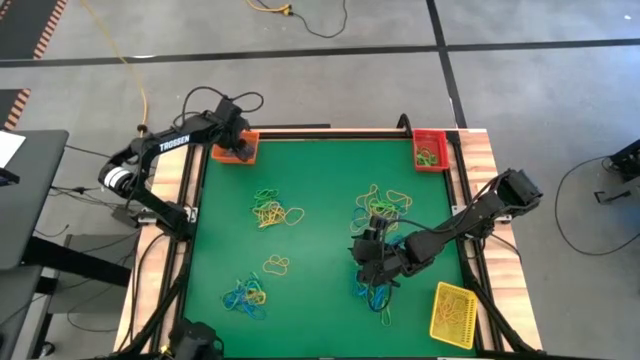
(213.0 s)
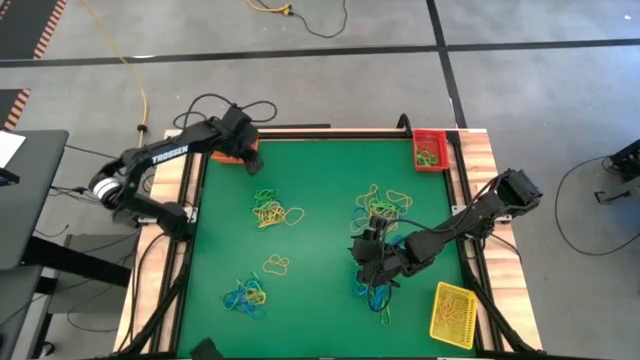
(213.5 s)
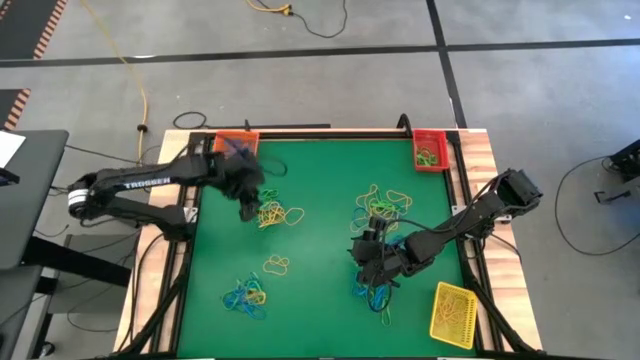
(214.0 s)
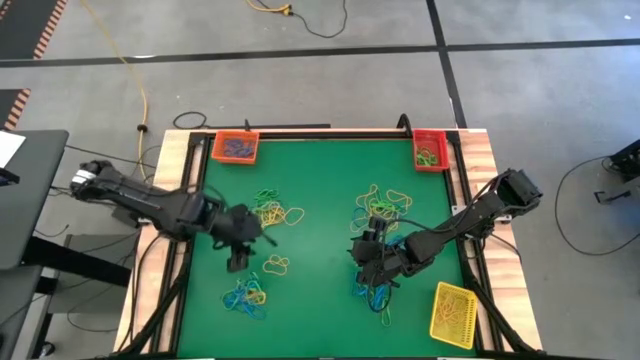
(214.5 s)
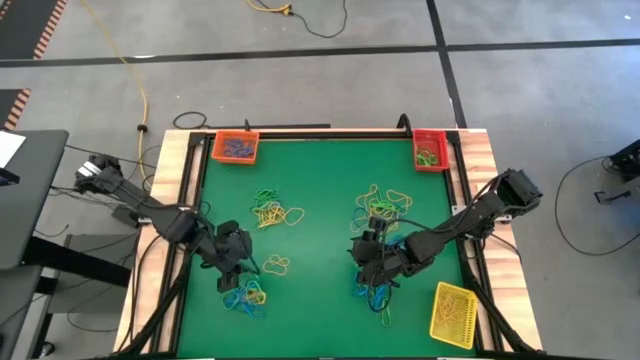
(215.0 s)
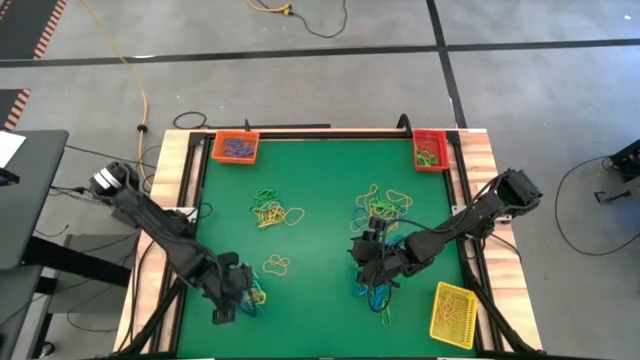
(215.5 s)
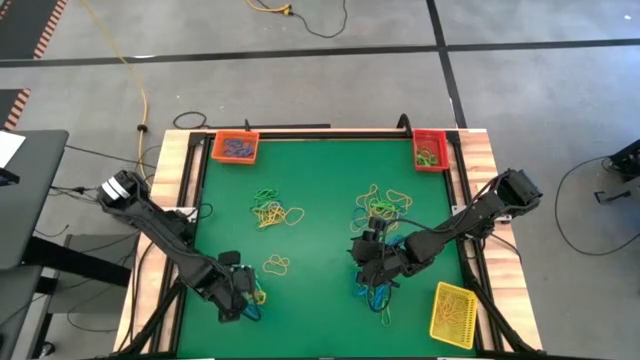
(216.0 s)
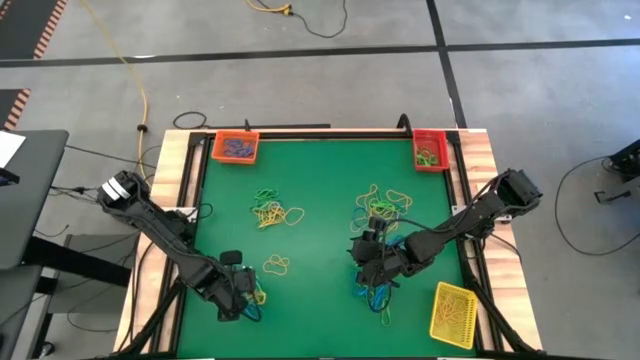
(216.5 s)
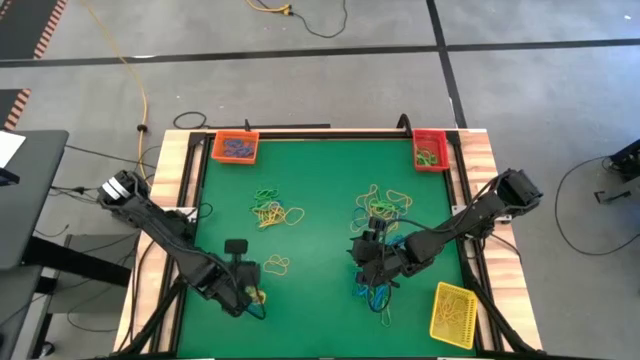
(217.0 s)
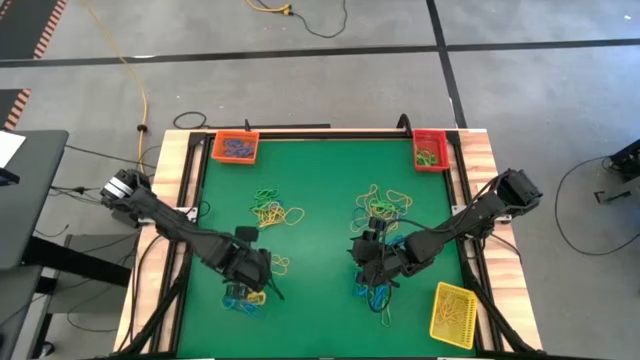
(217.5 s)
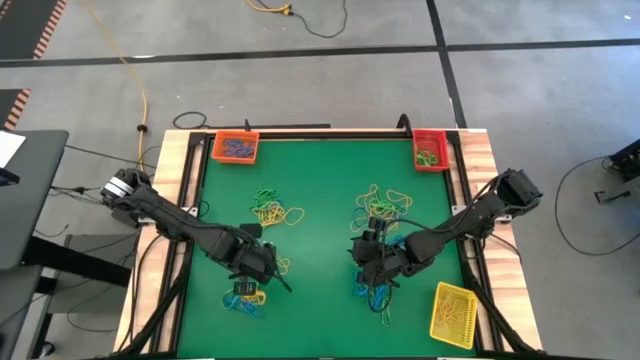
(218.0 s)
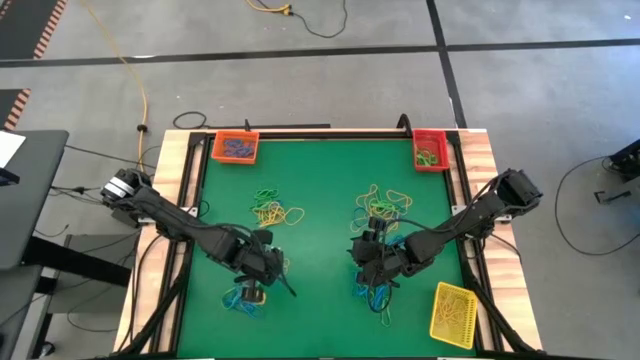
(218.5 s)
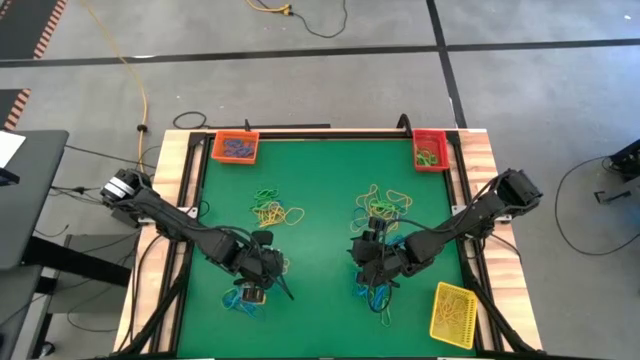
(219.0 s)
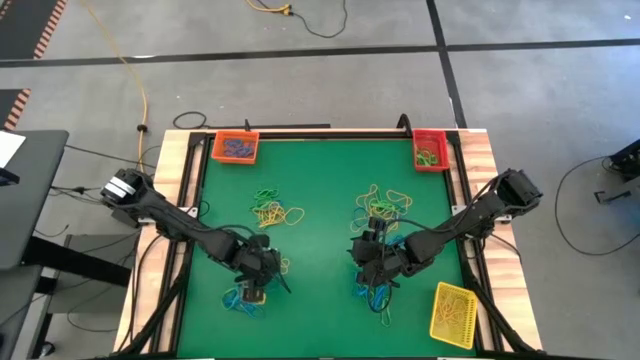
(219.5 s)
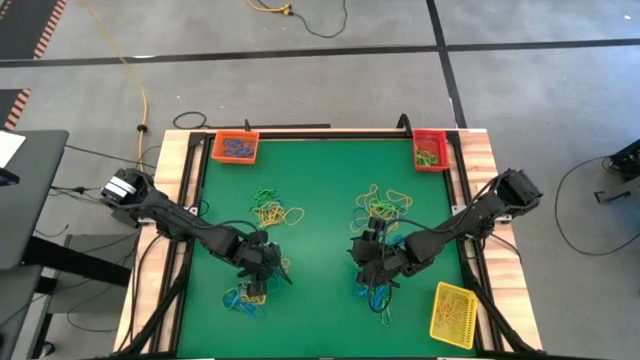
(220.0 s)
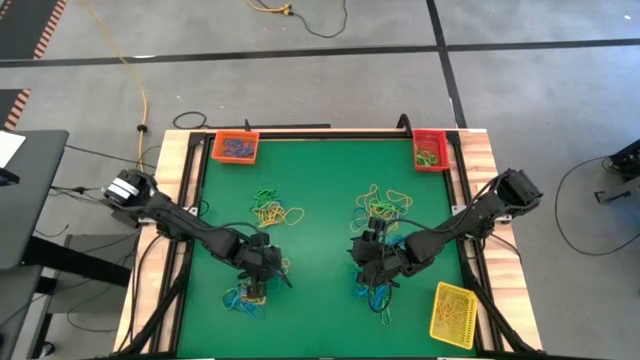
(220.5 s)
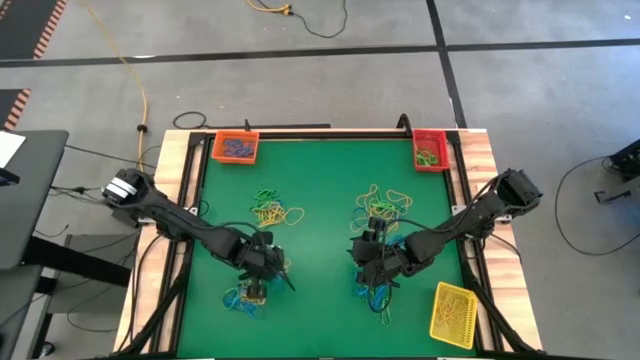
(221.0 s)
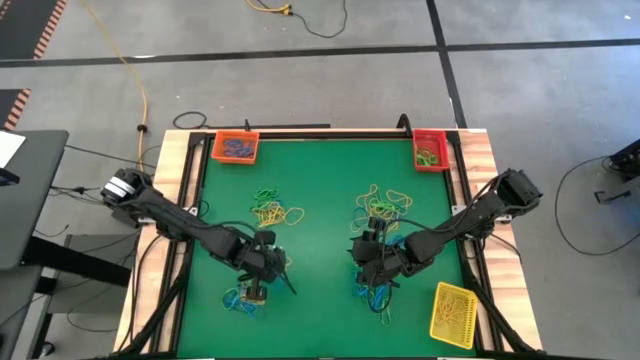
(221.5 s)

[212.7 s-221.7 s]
Task: Sort rubber bands into baskets
Put the bottom left blue rubber band into the orange bin

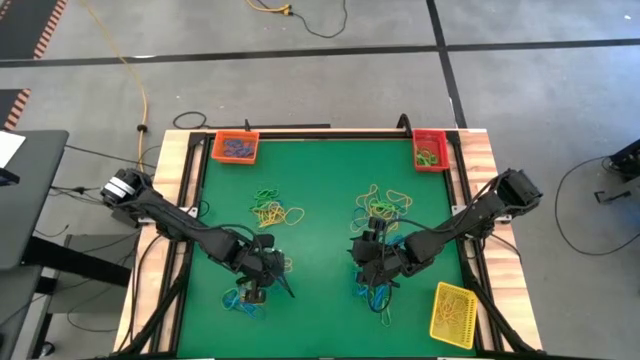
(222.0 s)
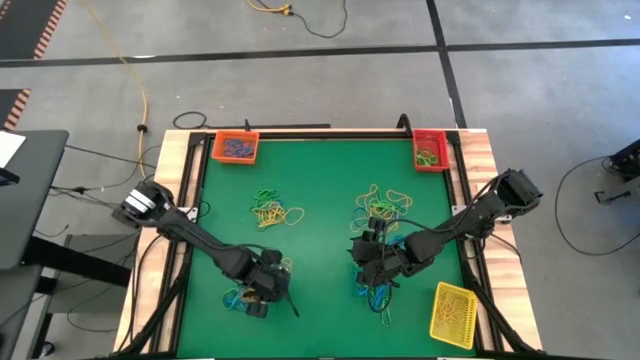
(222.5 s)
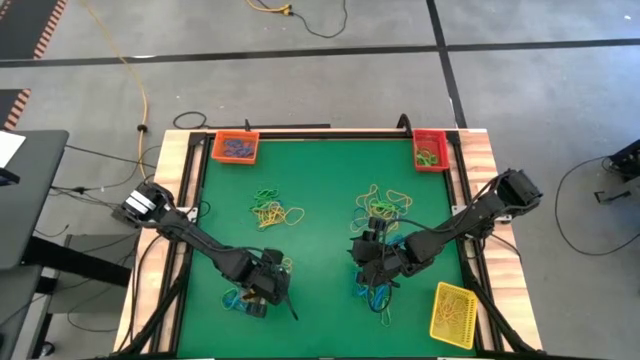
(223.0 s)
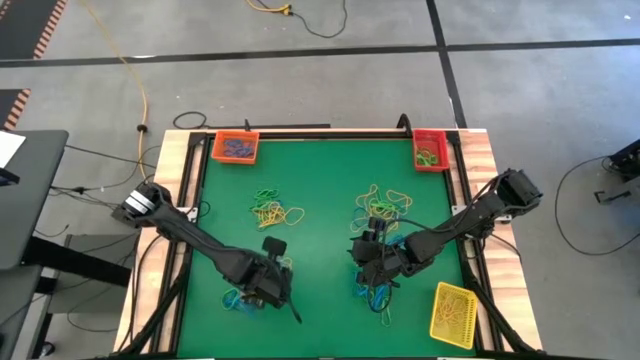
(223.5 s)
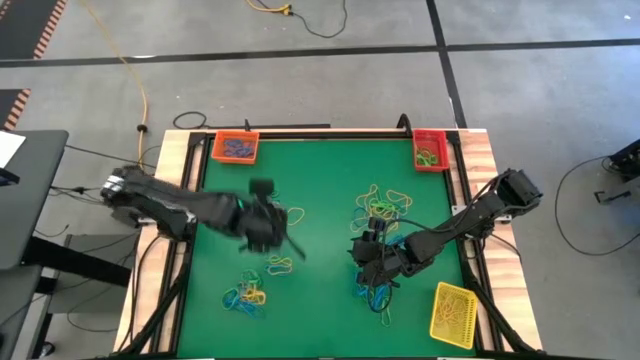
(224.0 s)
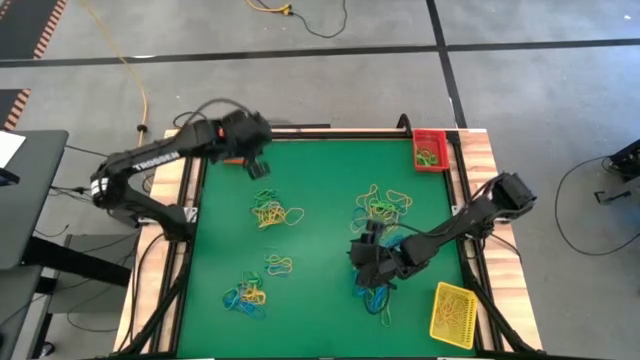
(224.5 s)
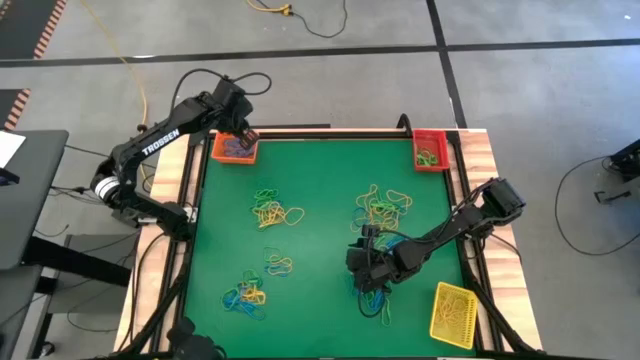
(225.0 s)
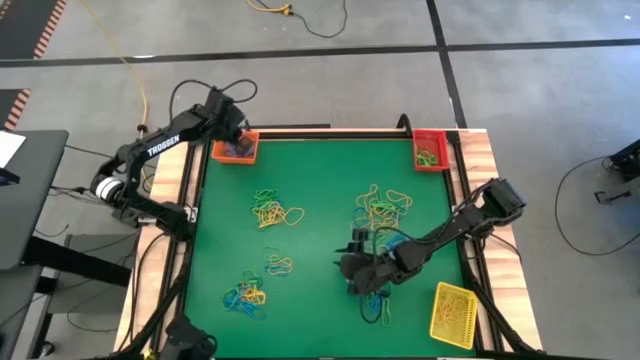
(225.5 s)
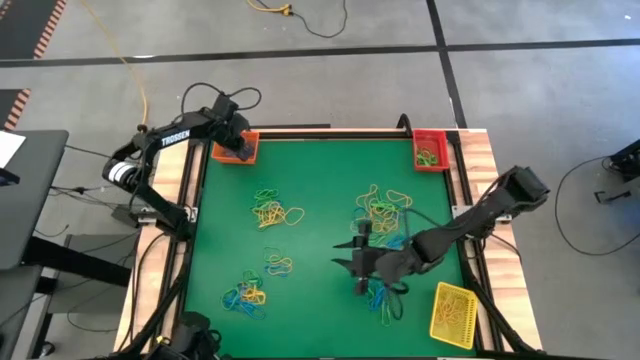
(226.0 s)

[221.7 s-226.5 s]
Put the bottom left blue rubber band into the orange bin

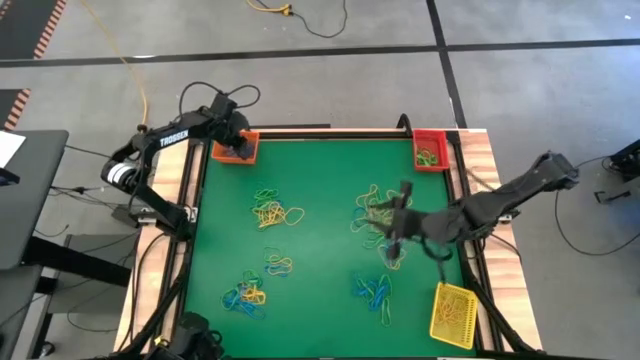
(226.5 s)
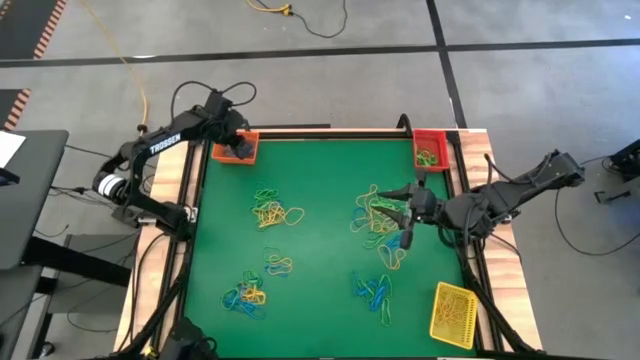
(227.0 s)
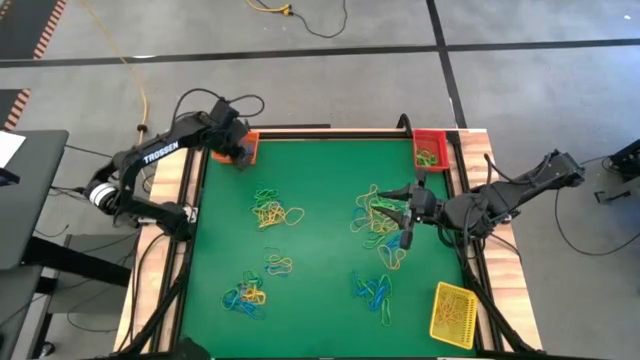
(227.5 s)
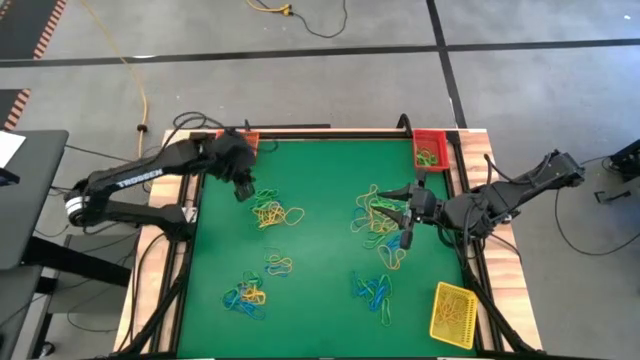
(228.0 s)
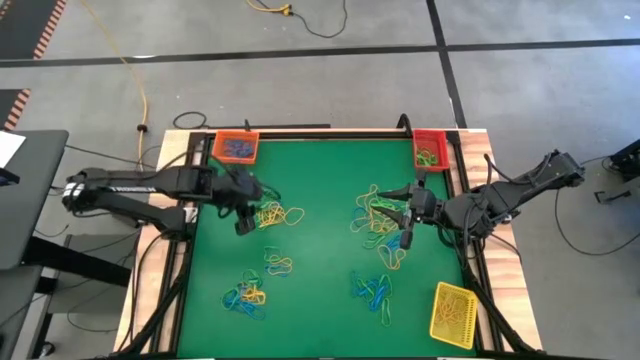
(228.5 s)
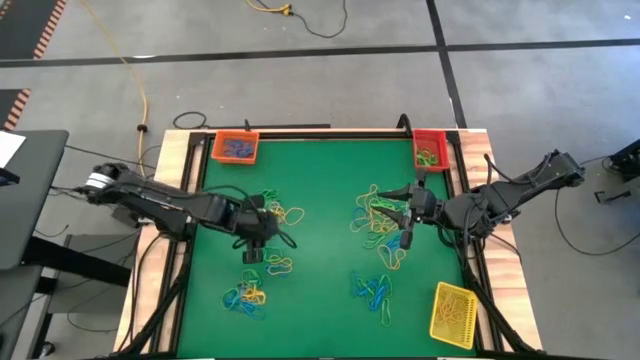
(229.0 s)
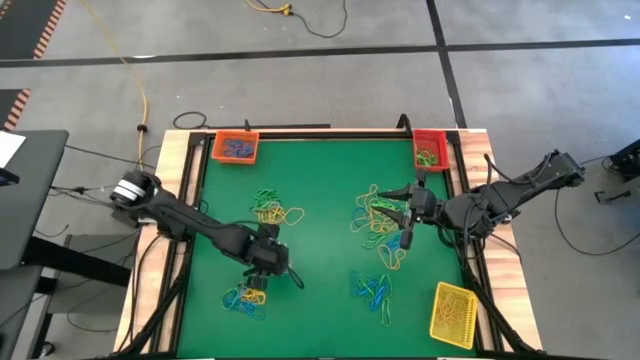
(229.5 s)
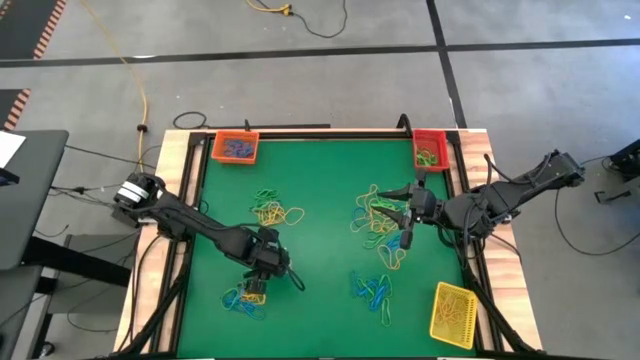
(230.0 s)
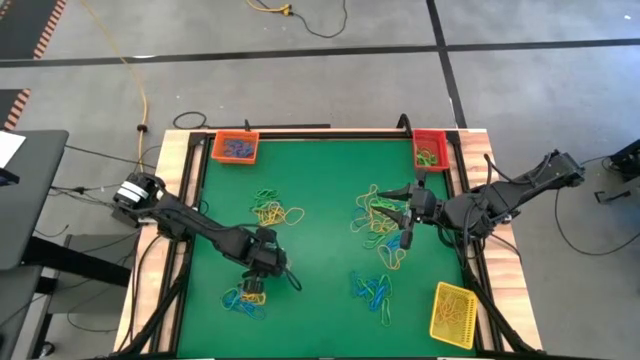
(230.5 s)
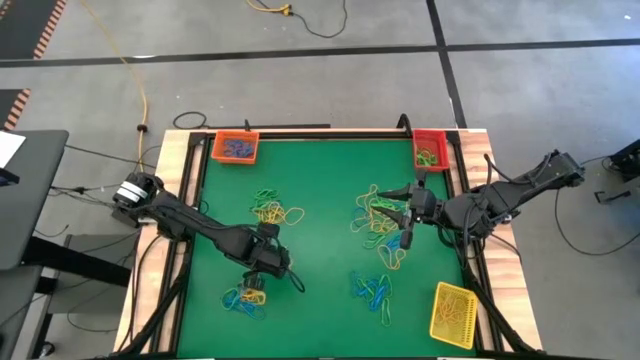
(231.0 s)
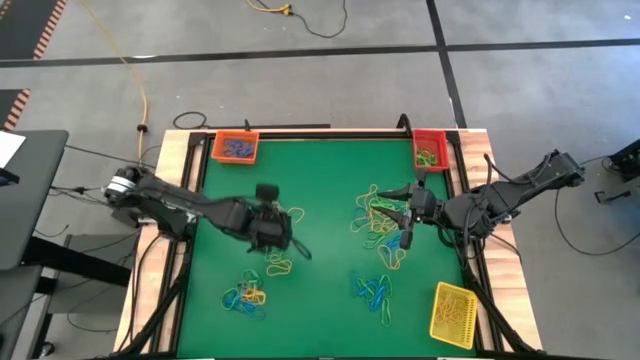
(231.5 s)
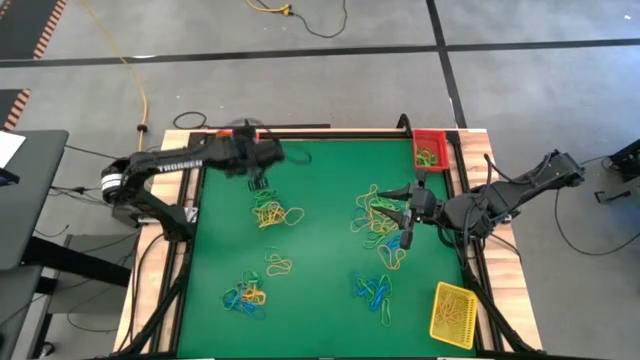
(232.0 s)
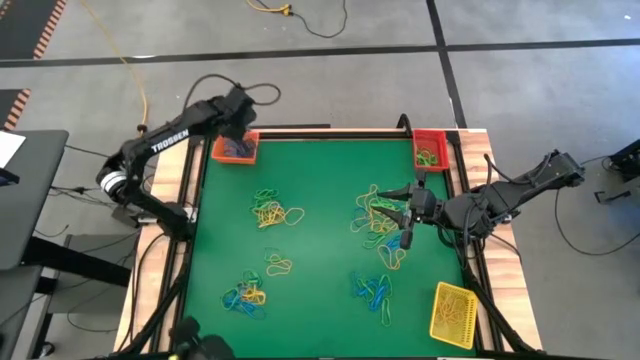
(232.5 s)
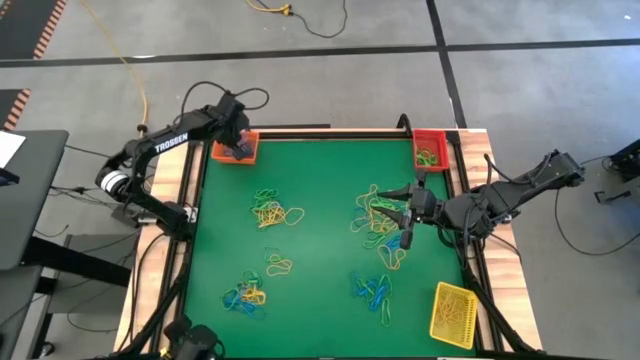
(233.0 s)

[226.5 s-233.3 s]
Put the bottom left blue rubber band into the orange bin
